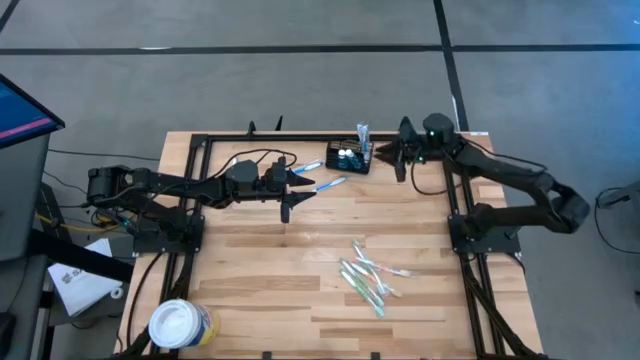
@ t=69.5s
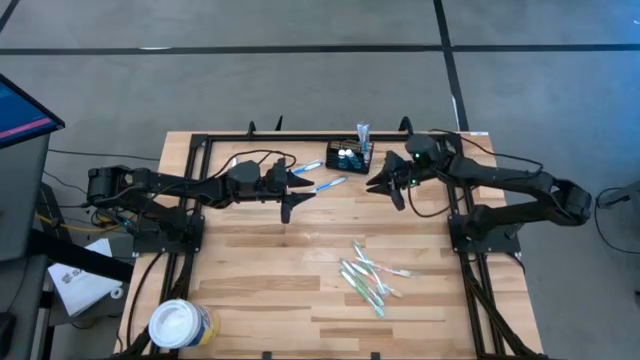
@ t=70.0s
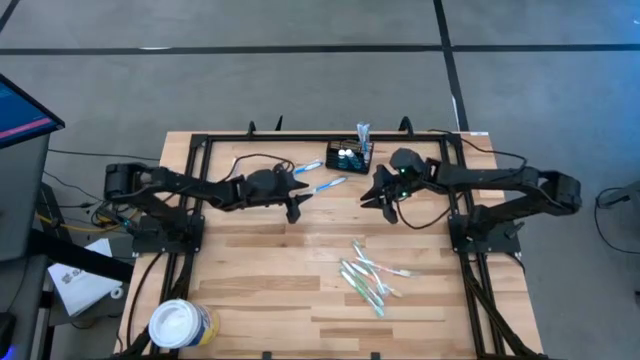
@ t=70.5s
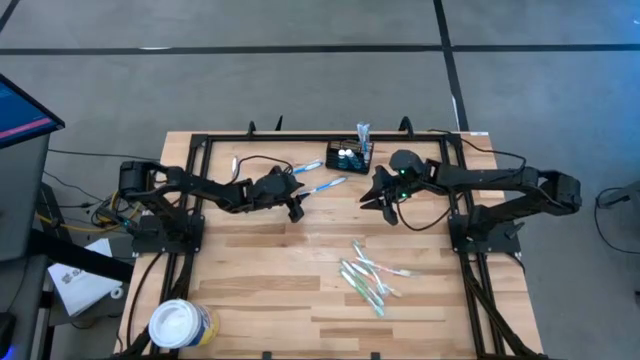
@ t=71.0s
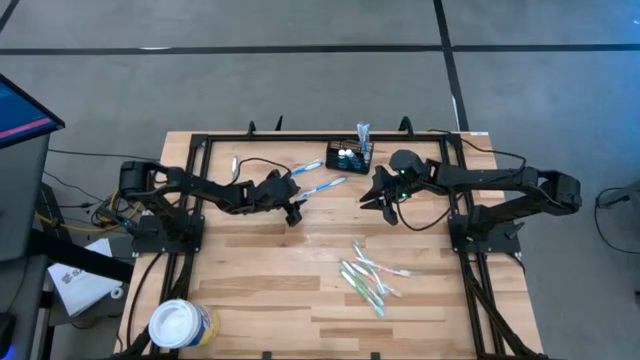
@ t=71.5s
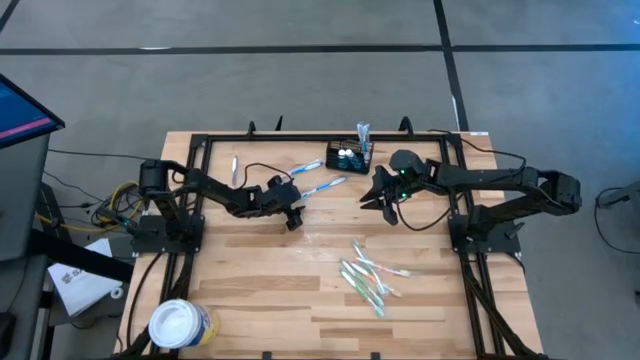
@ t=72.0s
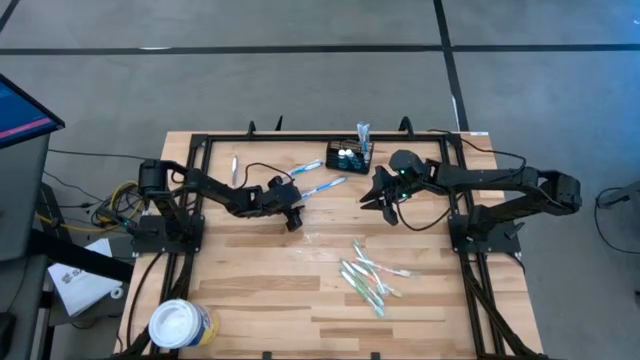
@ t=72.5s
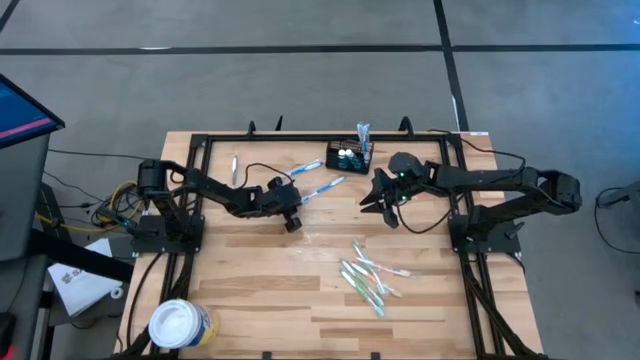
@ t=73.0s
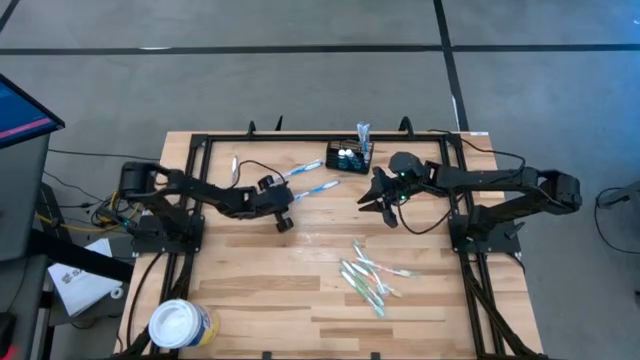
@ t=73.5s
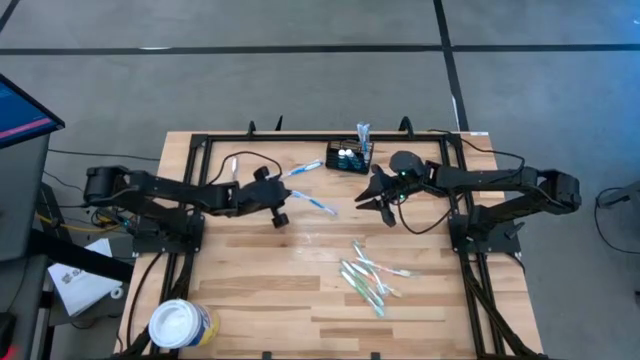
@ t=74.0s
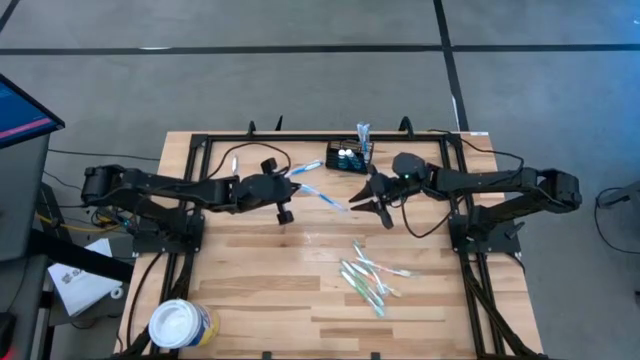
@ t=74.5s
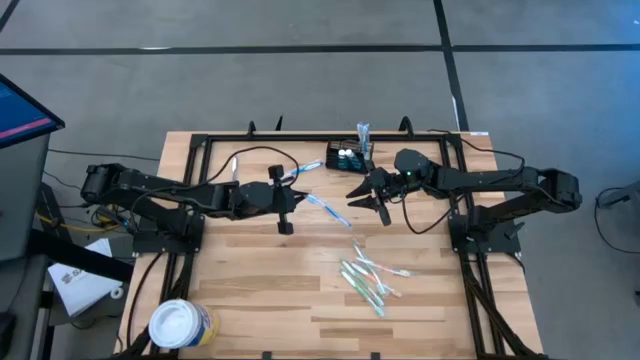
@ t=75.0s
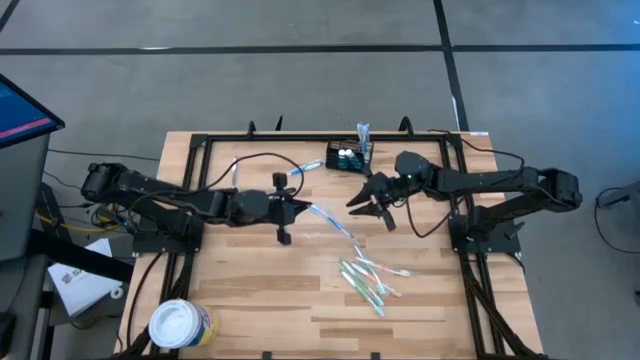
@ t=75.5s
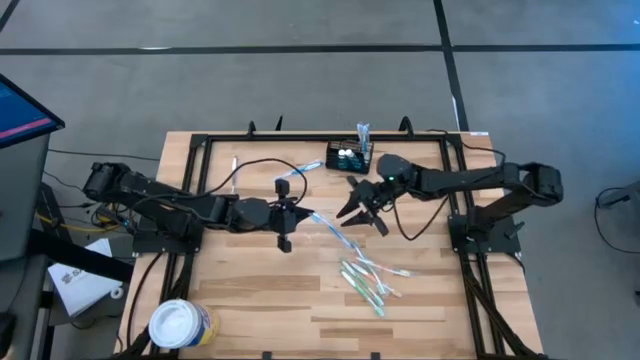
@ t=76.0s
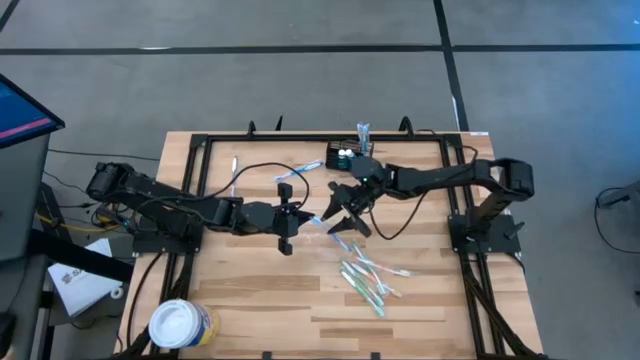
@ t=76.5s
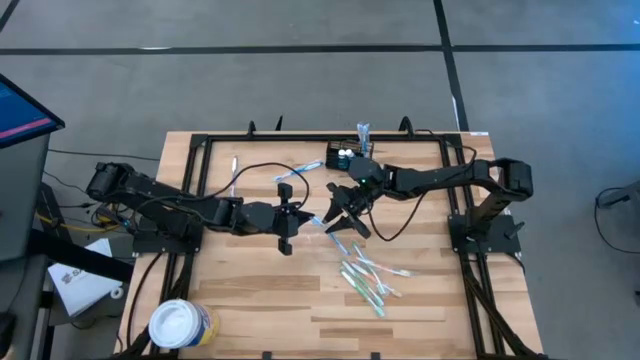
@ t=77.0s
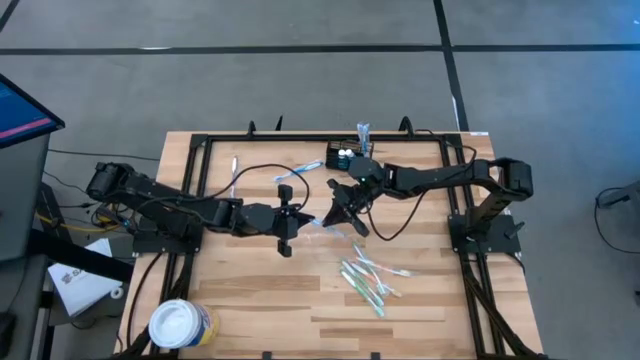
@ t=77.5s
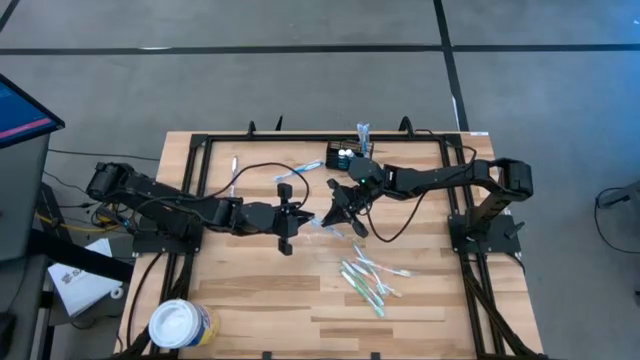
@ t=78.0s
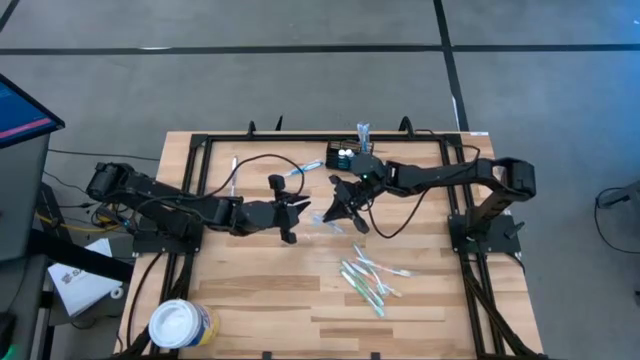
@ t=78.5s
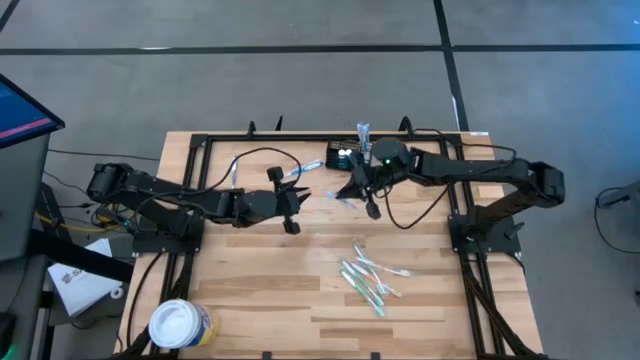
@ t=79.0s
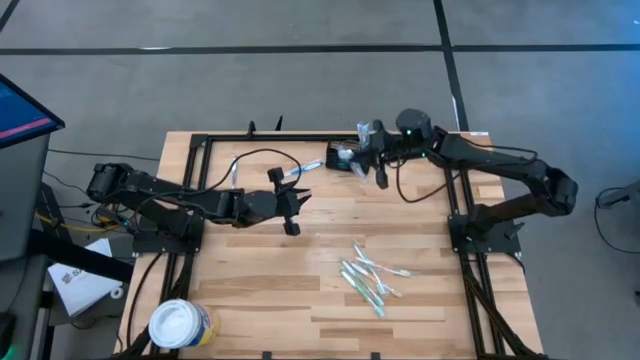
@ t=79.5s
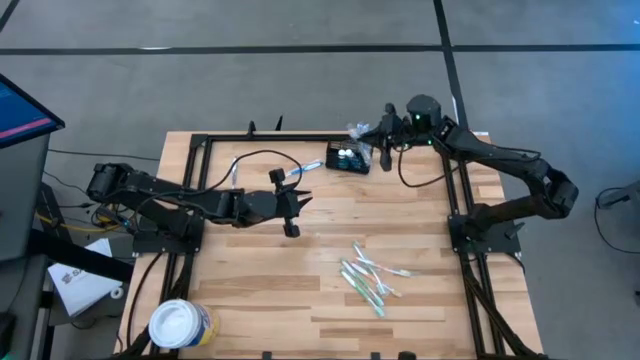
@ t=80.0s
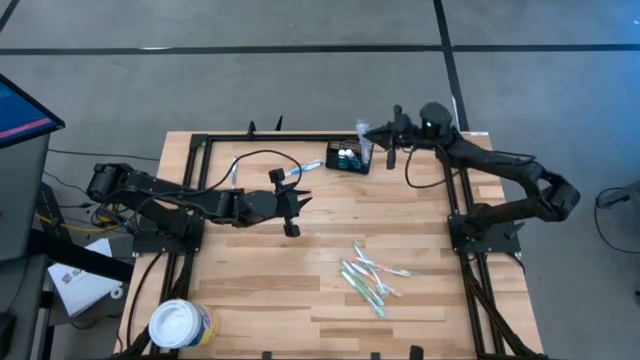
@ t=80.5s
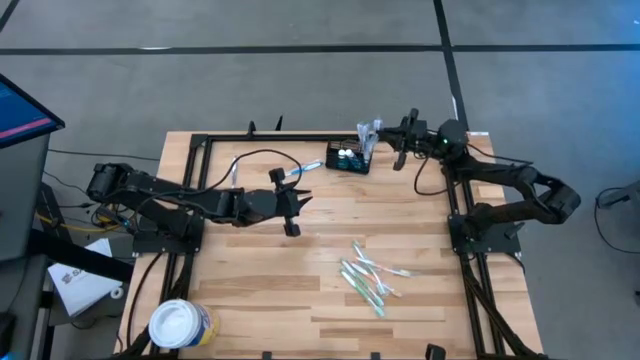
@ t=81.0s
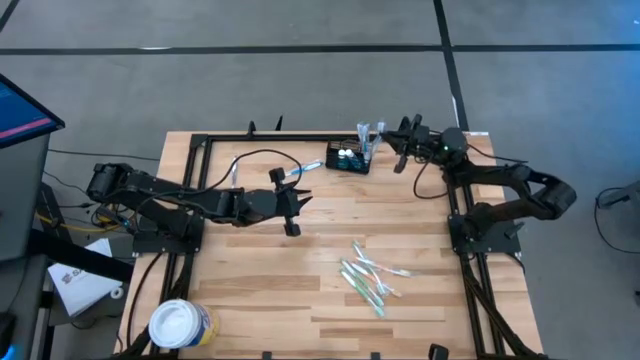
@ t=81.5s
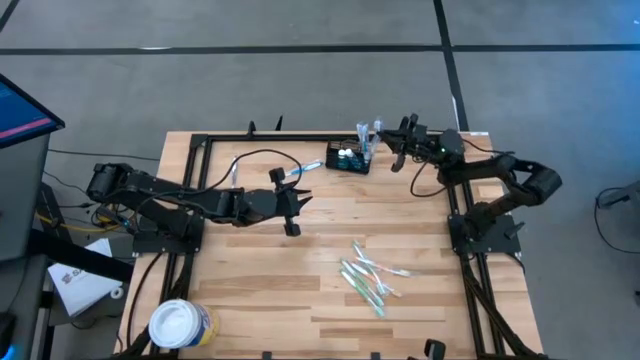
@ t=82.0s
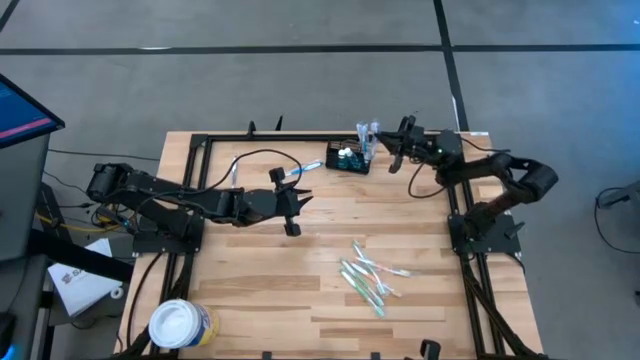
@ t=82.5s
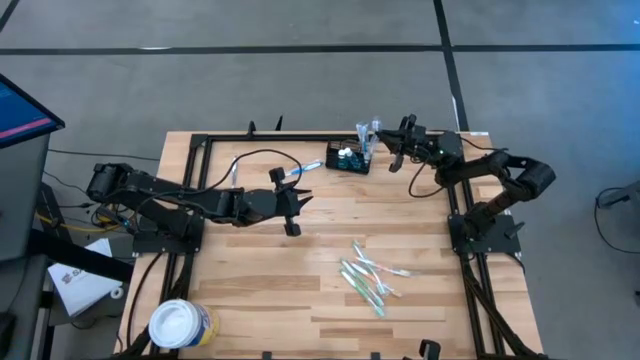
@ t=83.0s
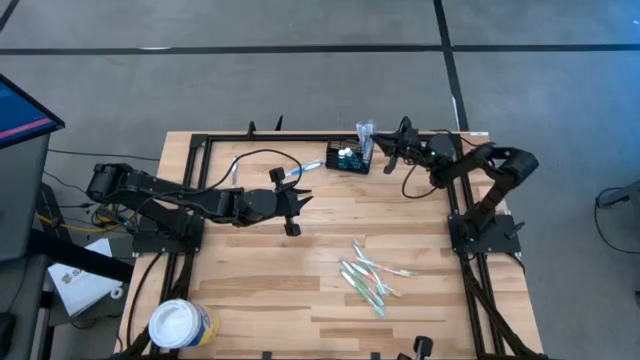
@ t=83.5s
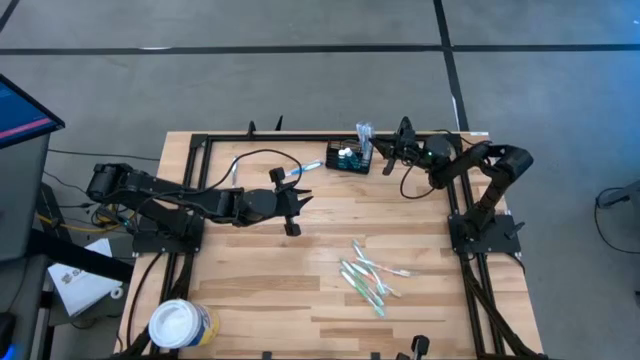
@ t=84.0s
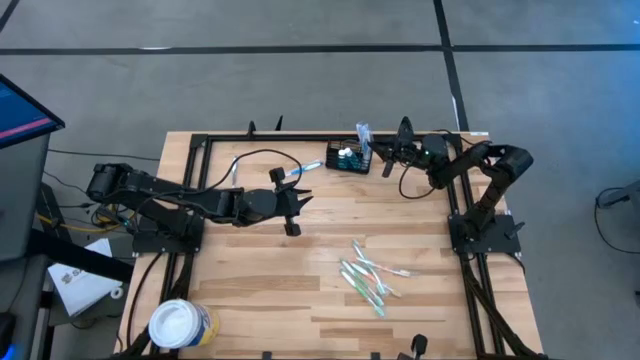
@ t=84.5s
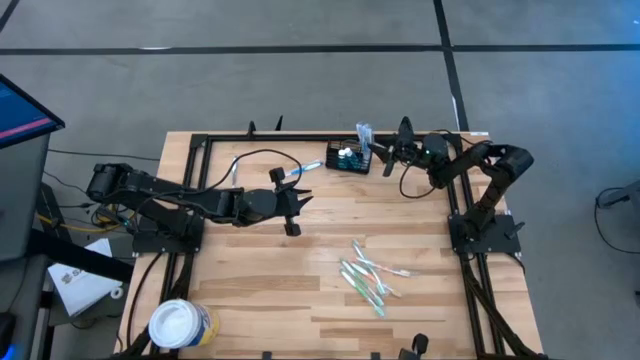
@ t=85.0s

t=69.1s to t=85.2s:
Task: Pick & Place toothbrushing station
Put the blue toothbrush into the mesh organizer

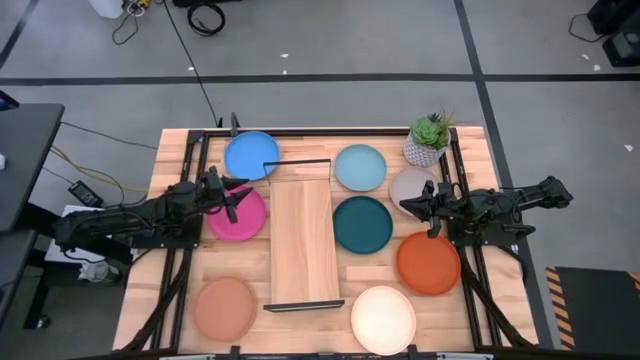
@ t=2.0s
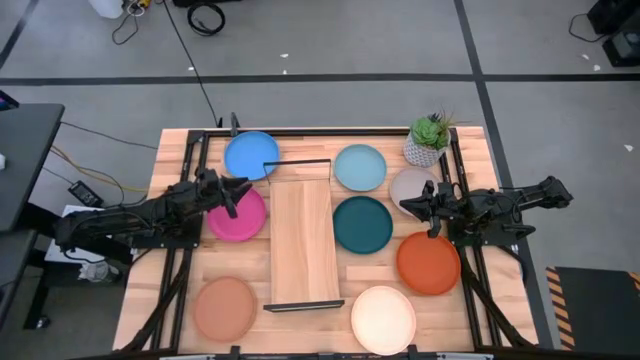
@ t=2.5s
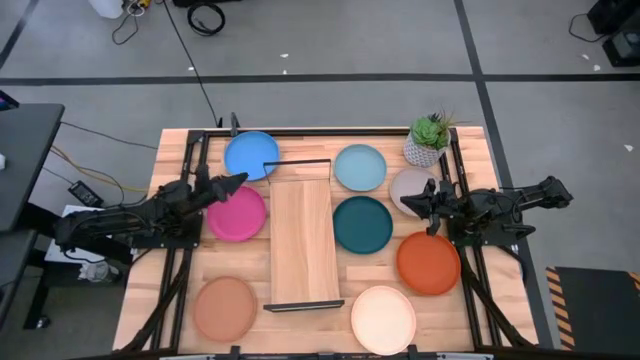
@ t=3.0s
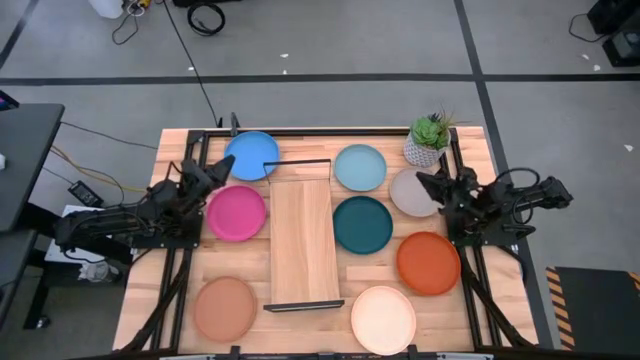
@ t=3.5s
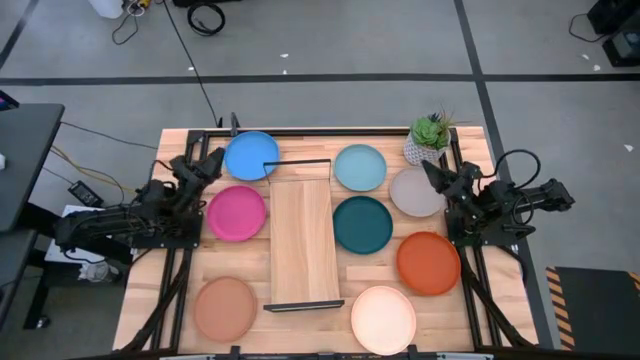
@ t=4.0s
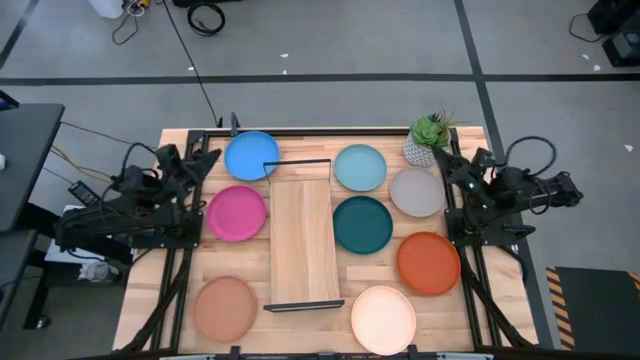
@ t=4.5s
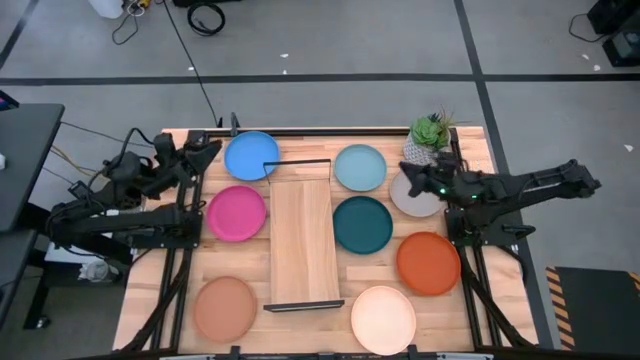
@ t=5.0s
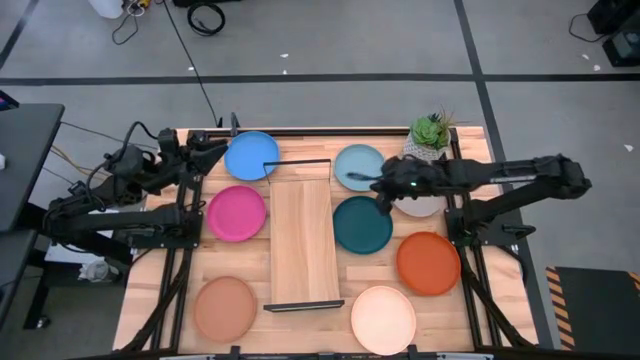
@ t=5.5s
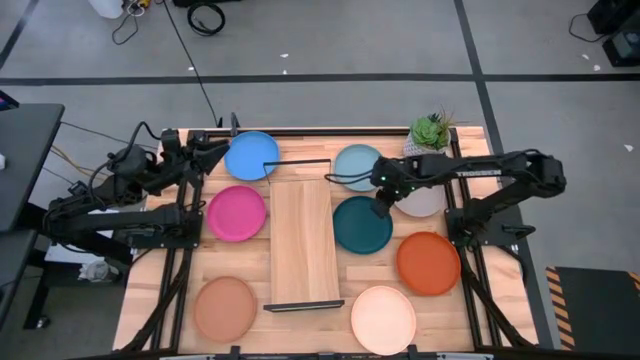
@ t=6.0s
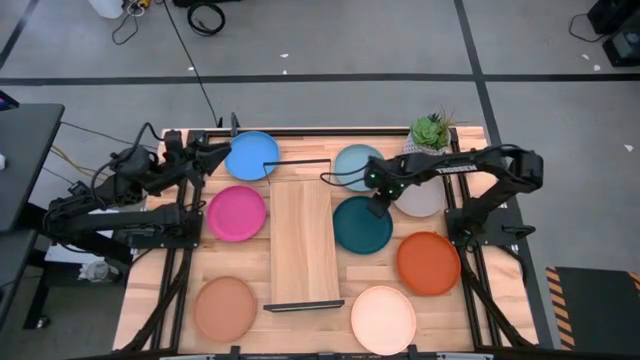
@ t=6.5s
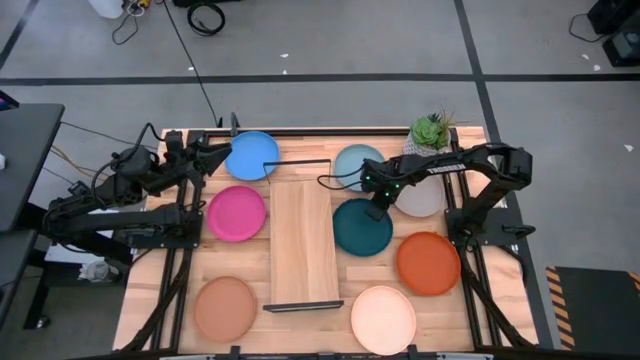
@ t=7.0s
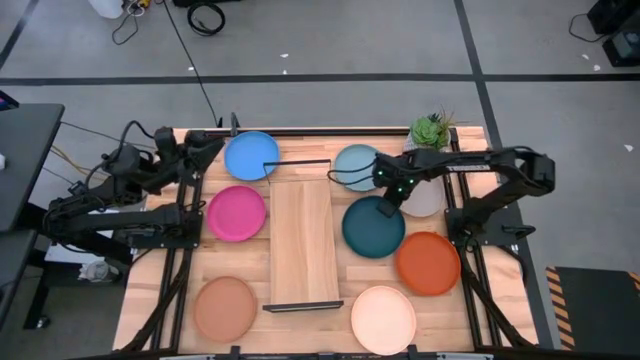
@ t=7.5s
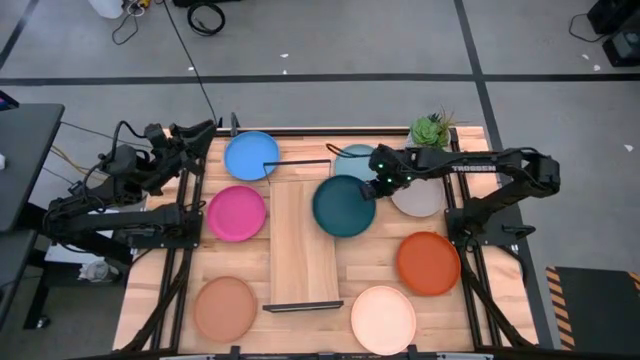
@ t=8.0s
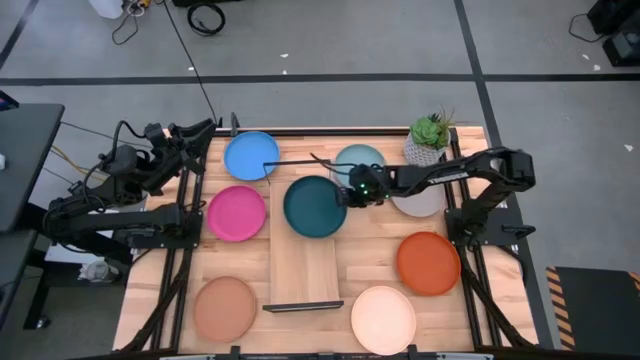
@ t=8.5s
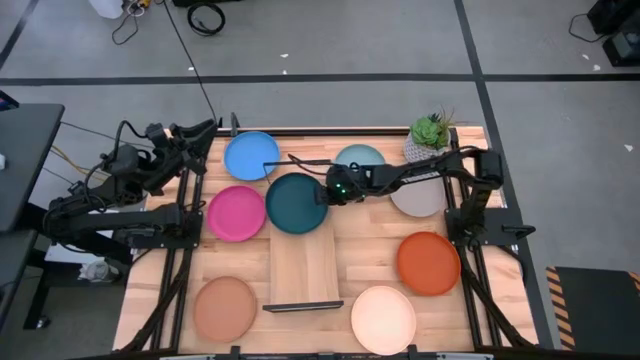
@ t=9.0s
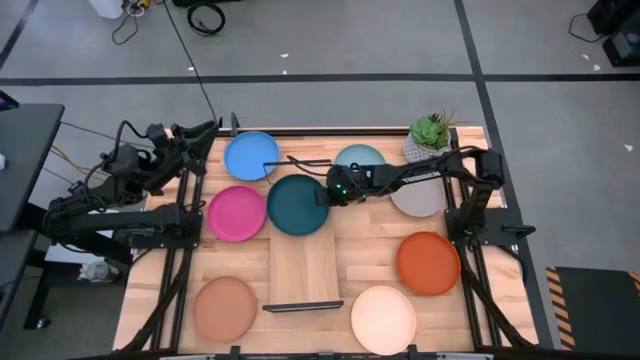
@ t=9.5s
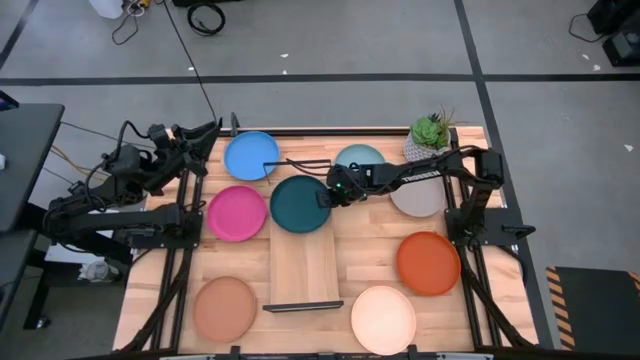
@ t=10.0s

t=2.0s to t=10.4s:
Task: Place and stack plates onto a shelf
Put the dark blue plate on the shelf
